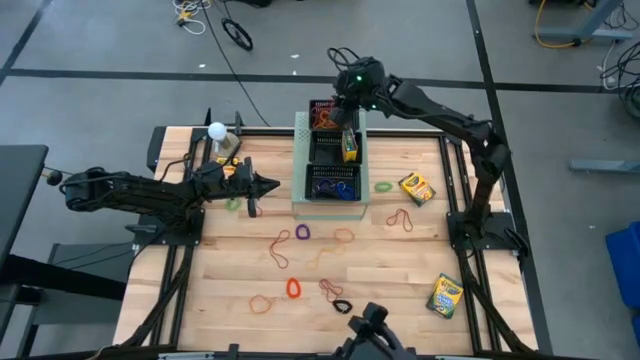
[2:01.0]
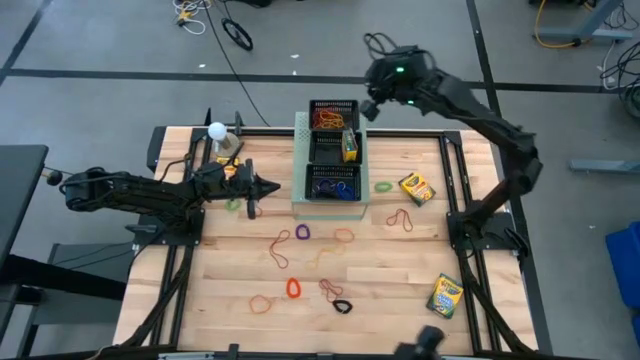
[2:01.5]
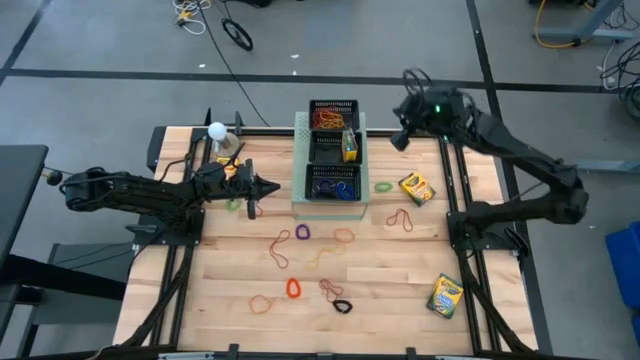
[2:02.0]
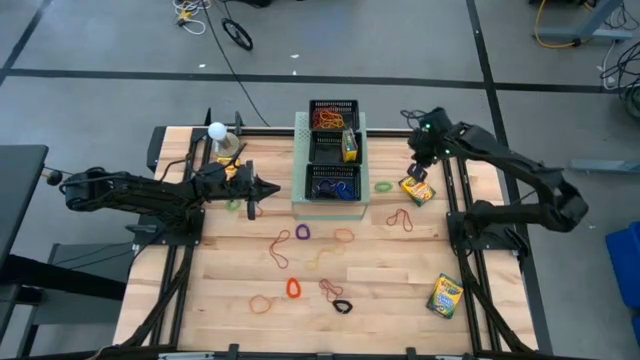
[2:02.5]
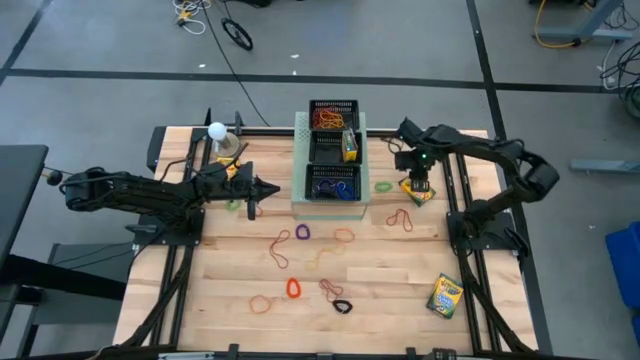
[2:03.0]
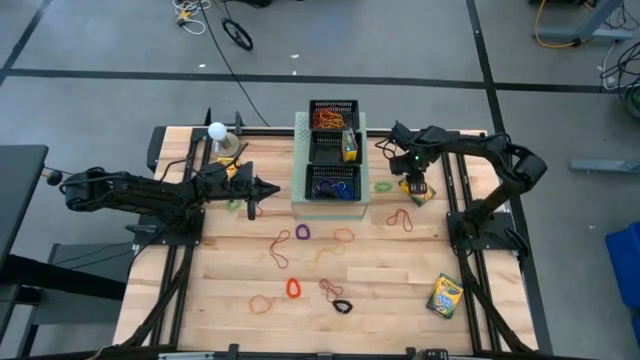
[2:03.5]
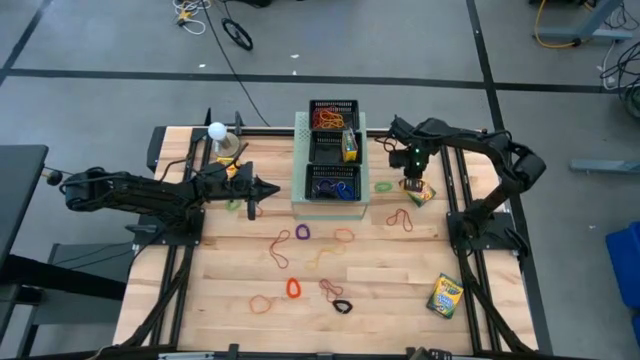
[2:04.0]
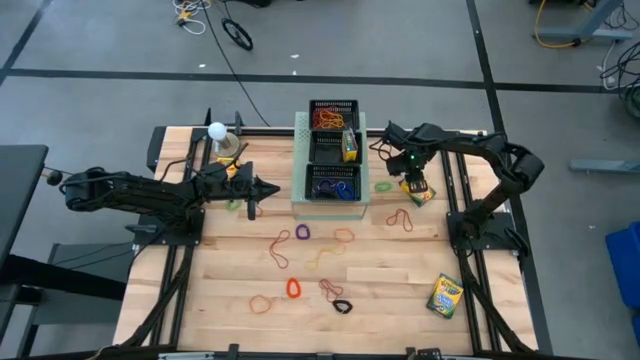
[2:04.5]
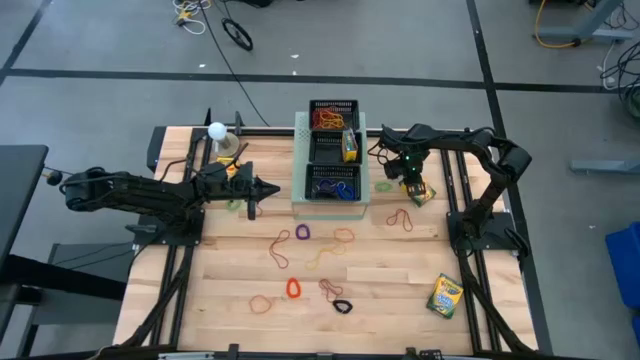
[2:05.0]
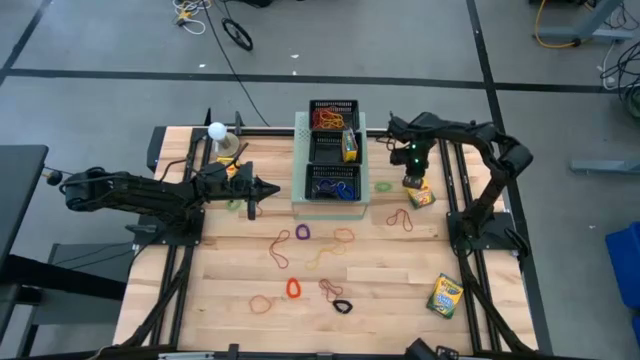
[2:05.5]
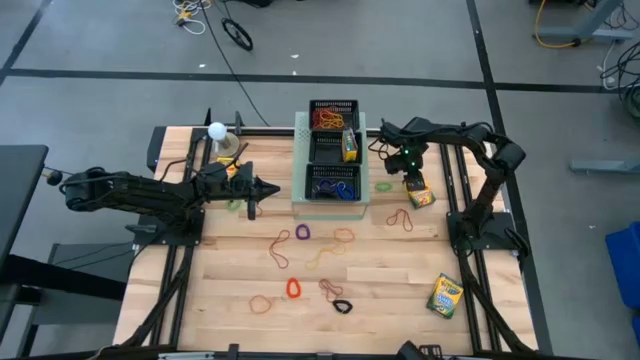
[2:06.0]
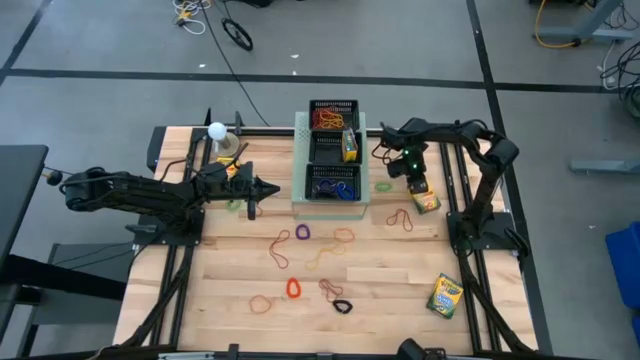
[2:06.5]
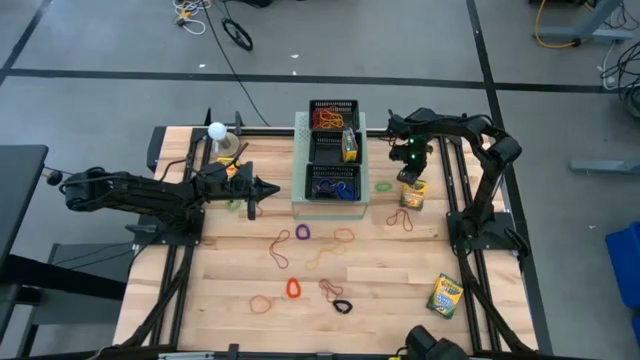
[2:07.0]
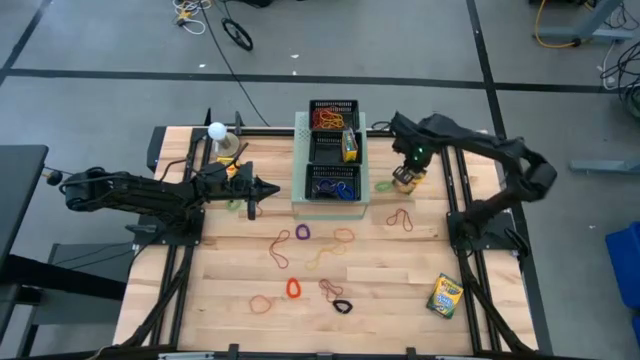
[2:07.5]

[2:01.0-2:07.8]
Task: Pick & Place Office Desk Supplies
Put the top right yellow crayon box into the middle black bin on the shelf

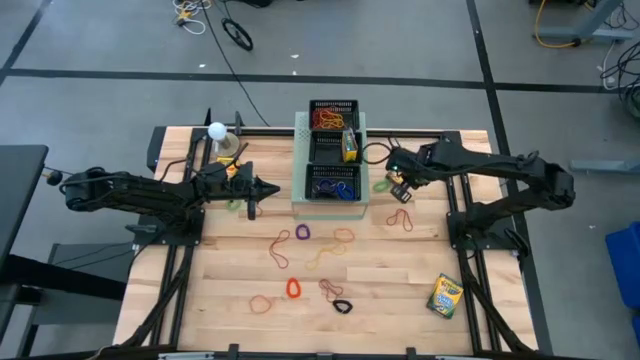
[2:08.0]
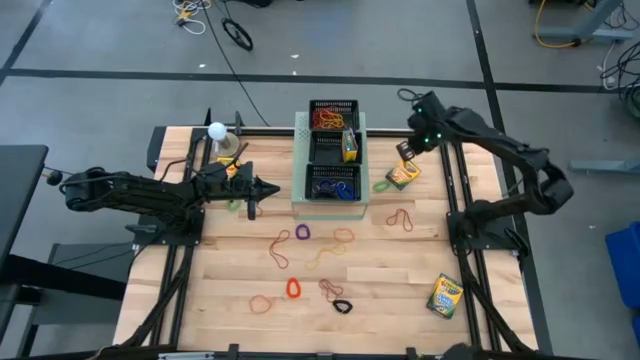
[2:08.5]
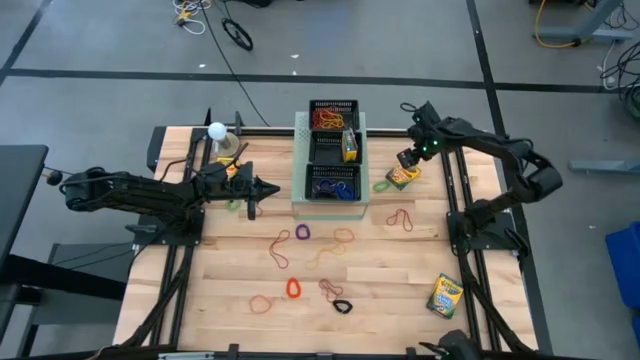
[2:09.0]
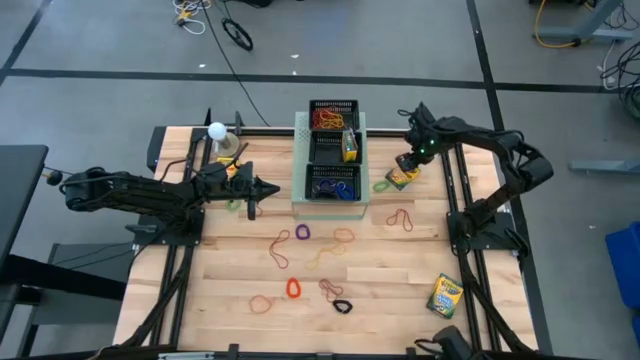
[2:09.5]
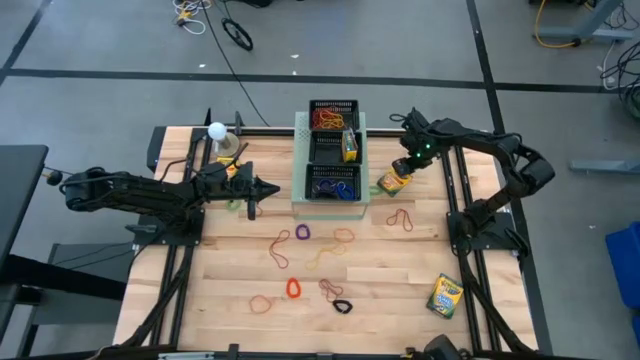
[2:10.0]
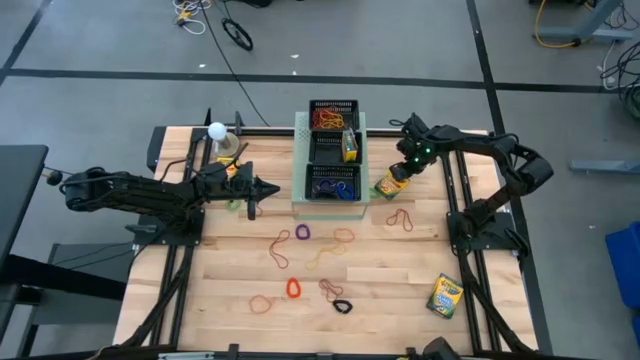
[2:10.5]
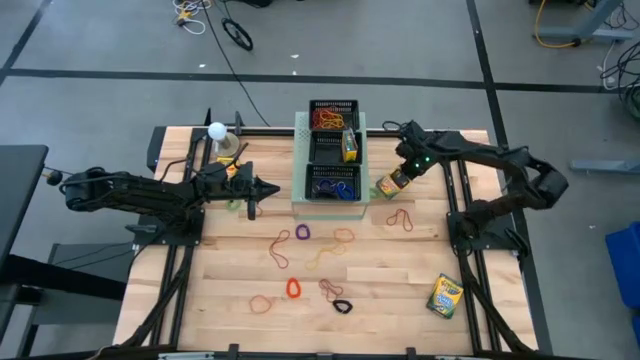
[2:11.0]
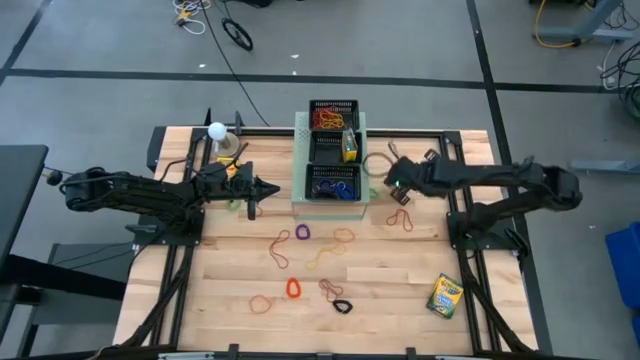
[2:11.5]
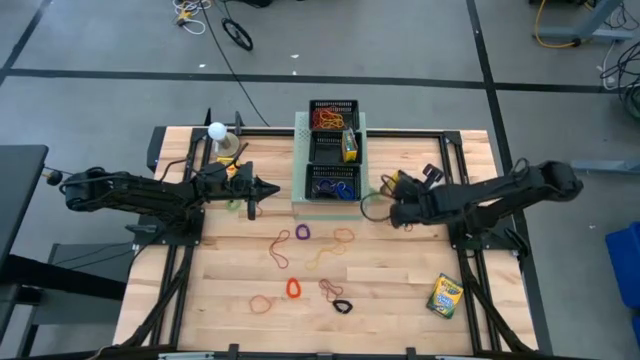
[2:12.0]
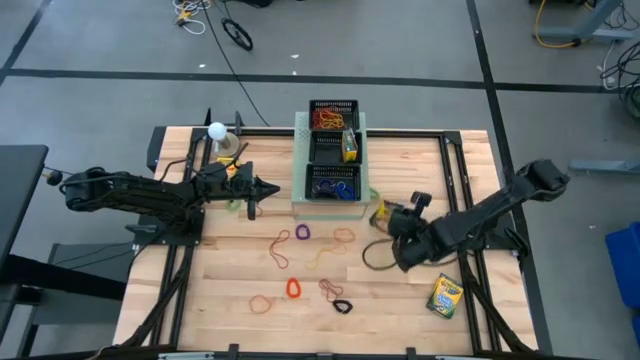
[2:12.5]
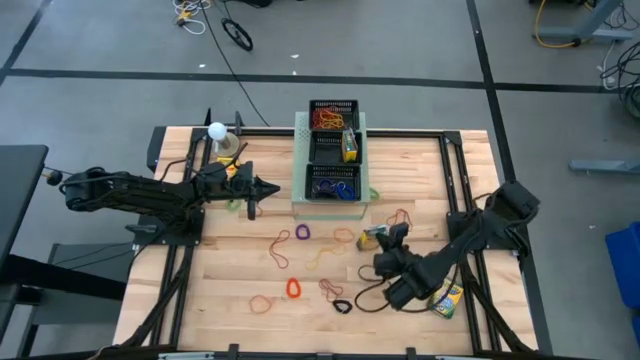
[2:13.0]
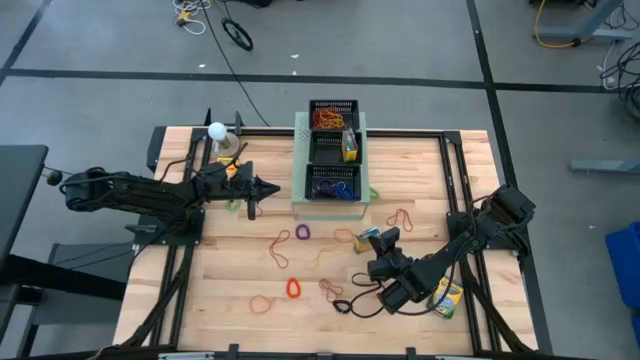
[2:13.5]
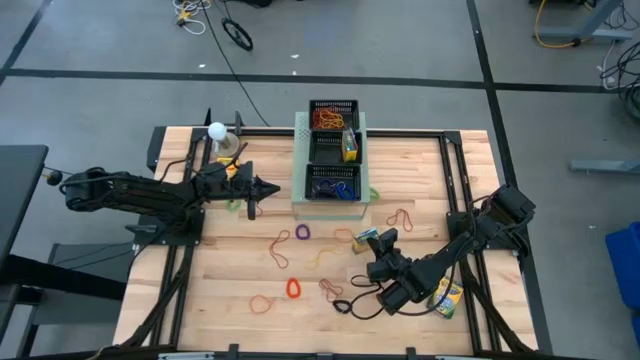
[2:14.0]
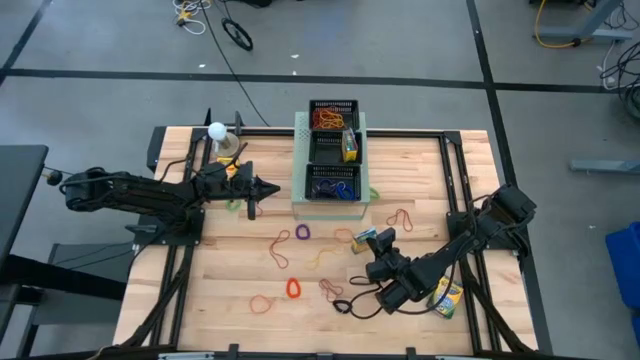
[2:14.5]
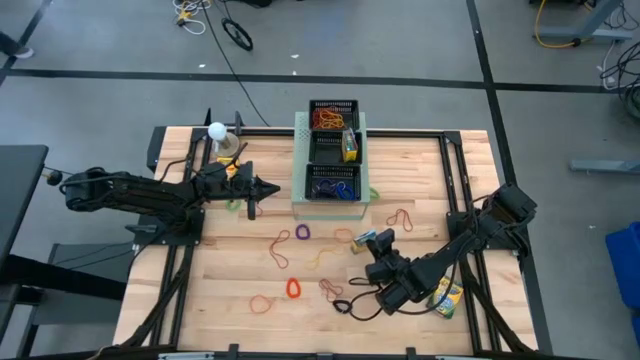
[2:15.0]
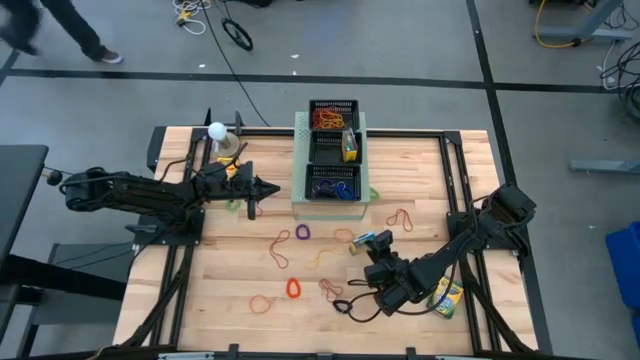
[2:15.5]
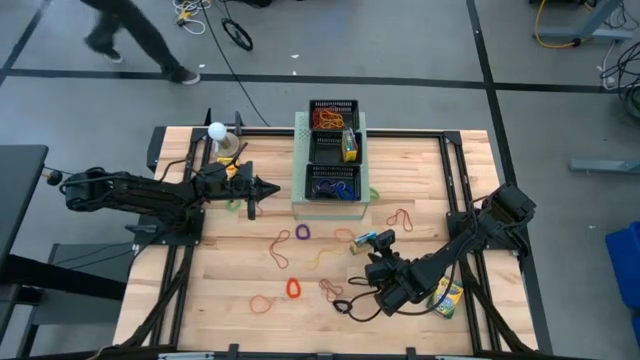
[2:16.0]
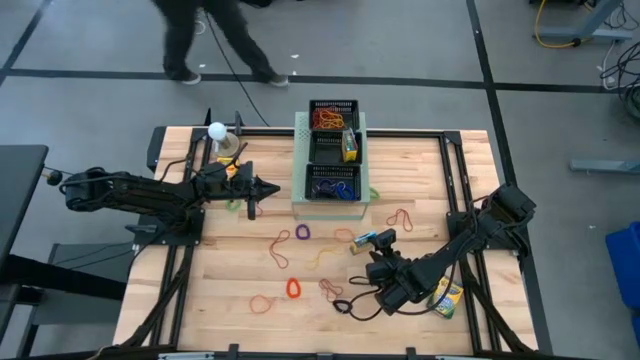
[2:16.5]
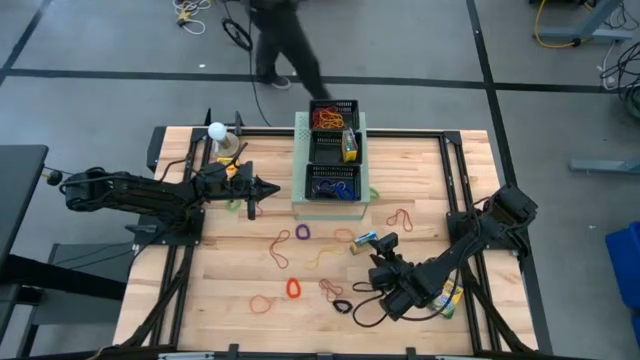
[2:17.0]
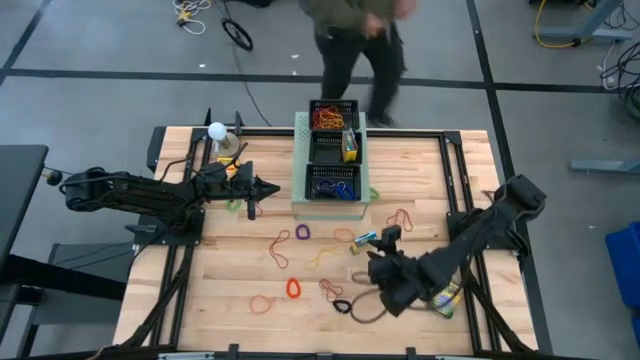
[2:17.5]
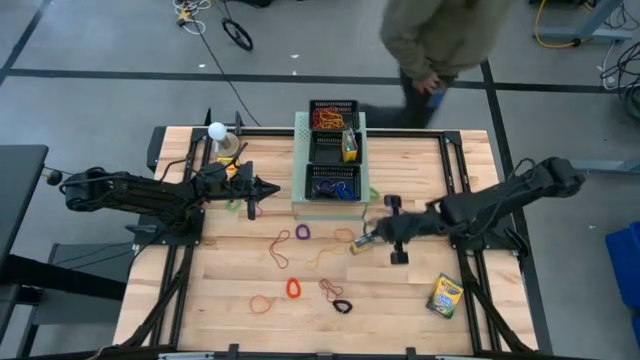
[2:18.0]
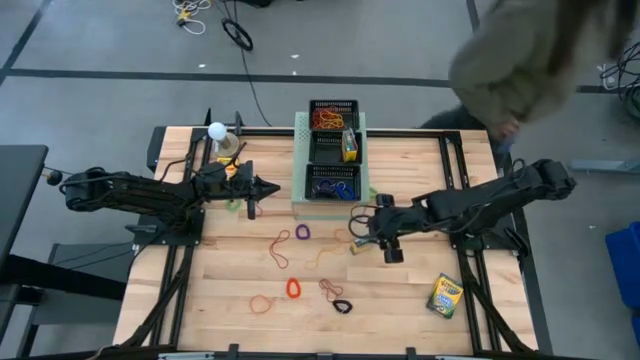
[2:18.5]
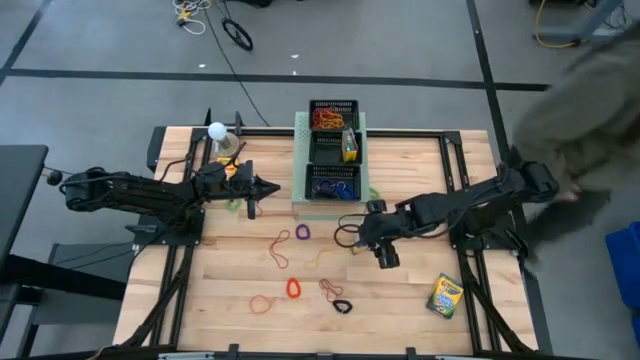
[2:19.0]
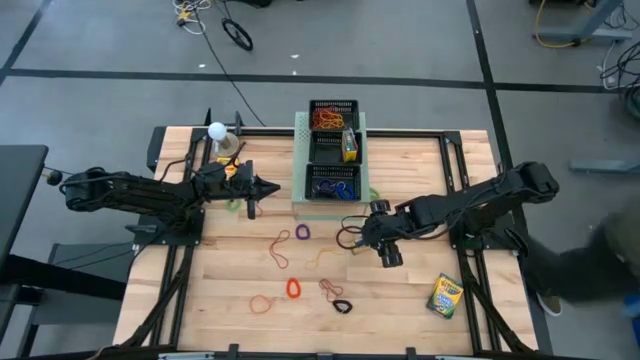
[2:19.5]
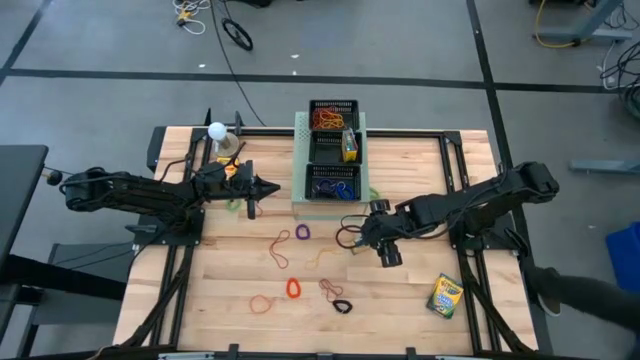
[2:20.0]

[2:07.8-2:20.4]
Put the top right yellow crayon box into the middle black bin on the shelf
